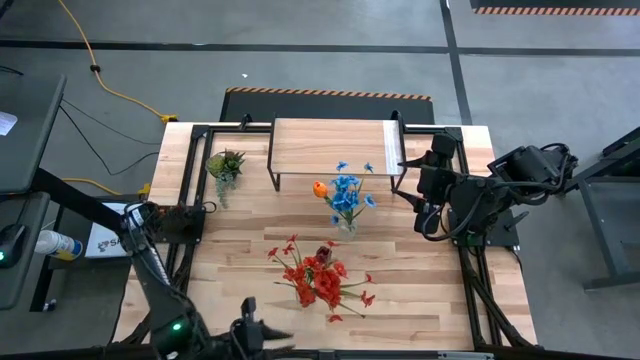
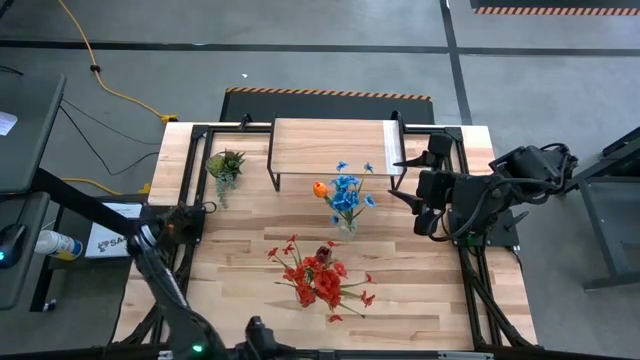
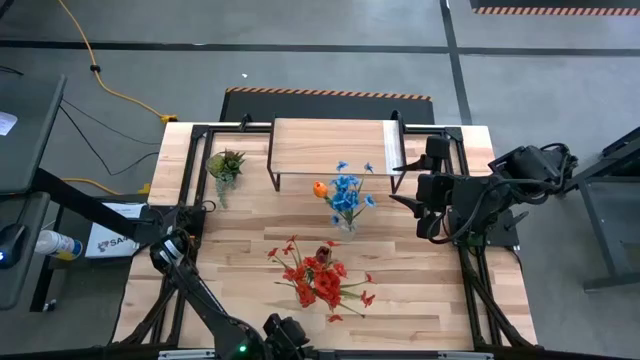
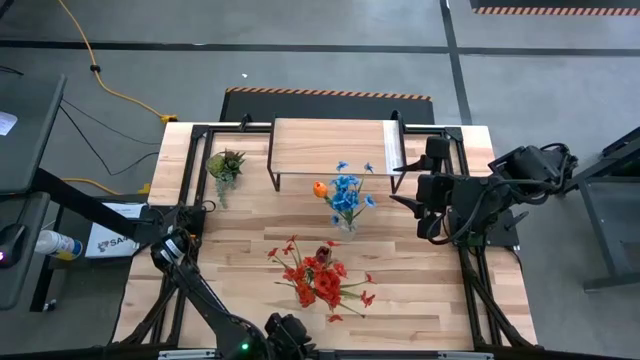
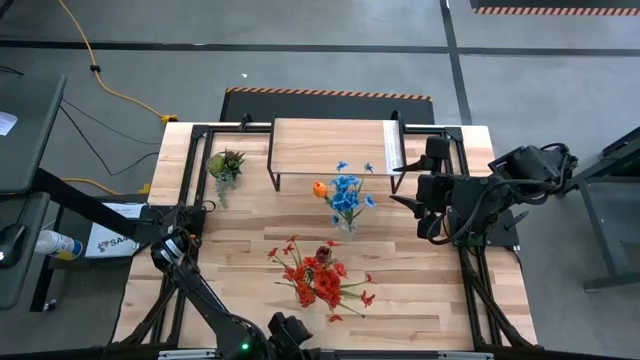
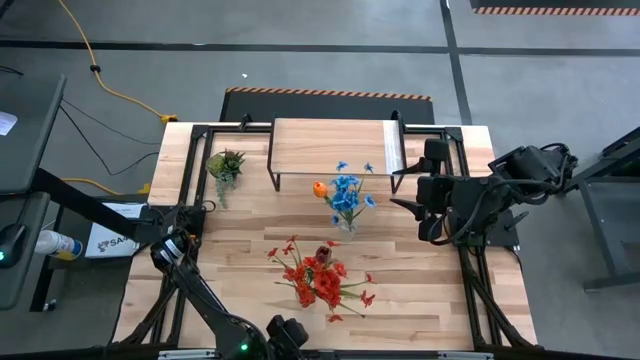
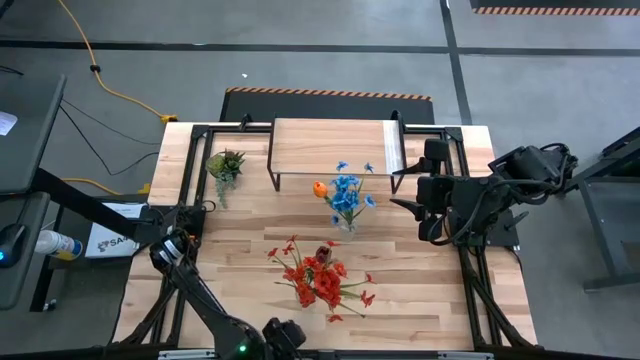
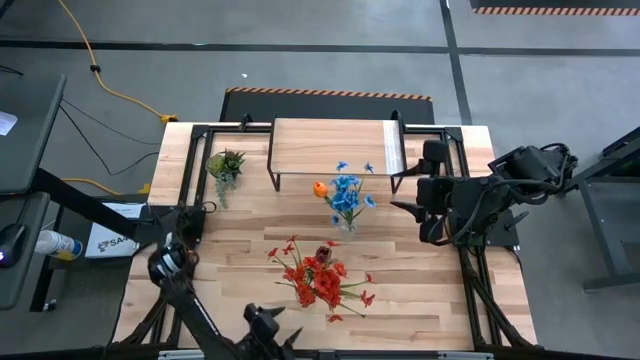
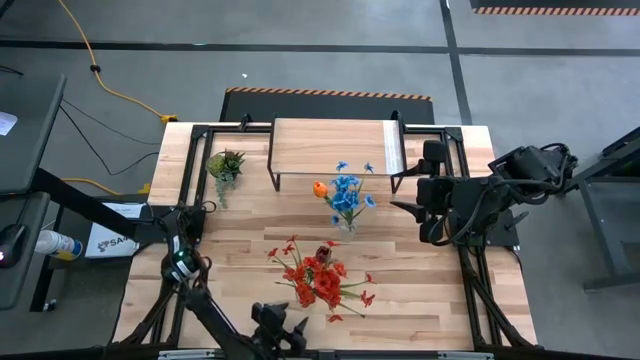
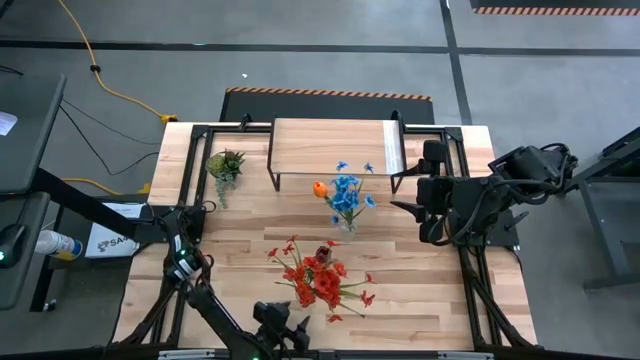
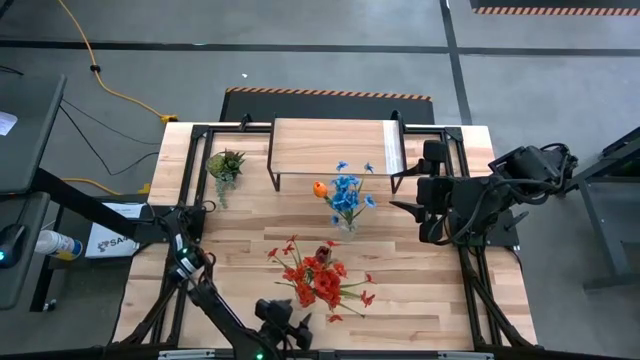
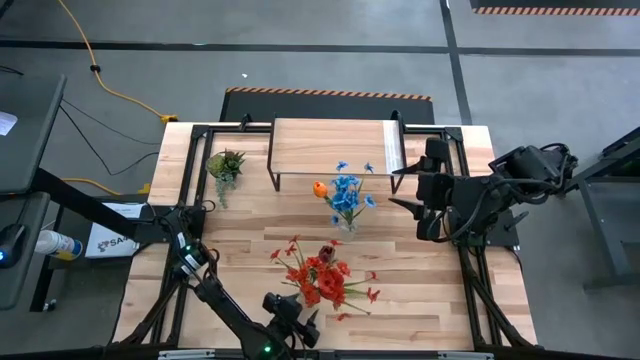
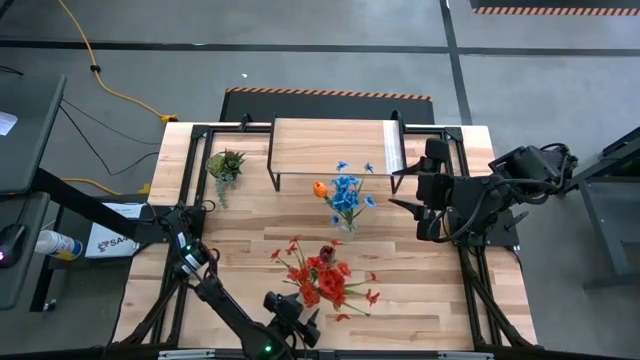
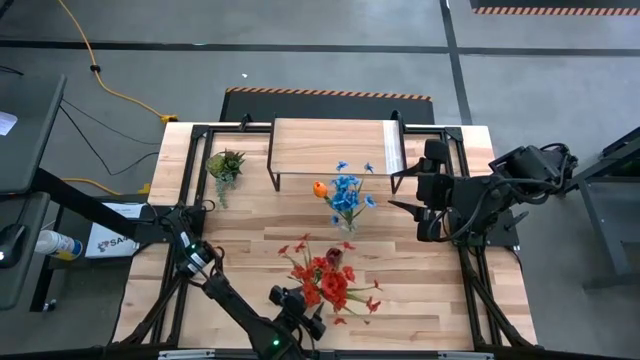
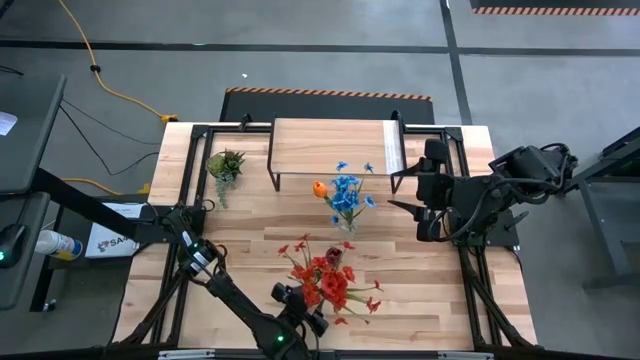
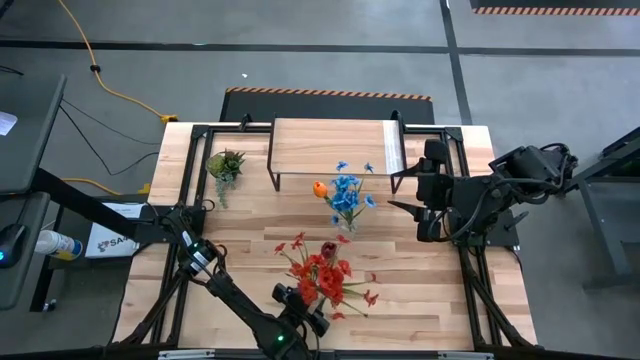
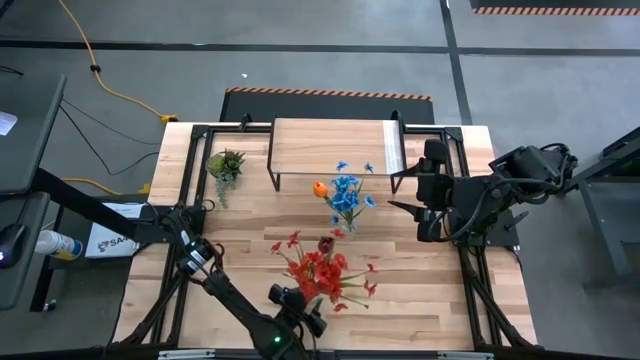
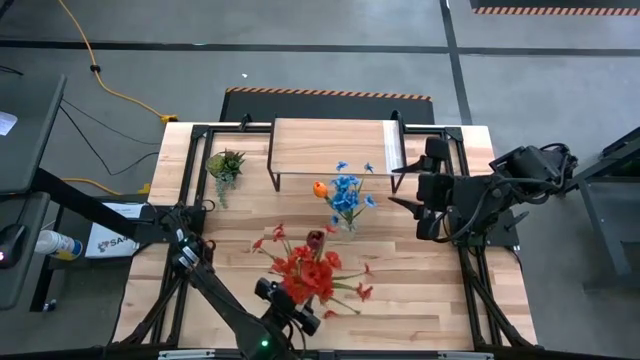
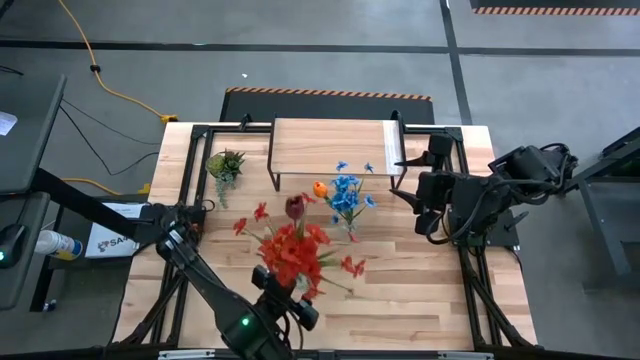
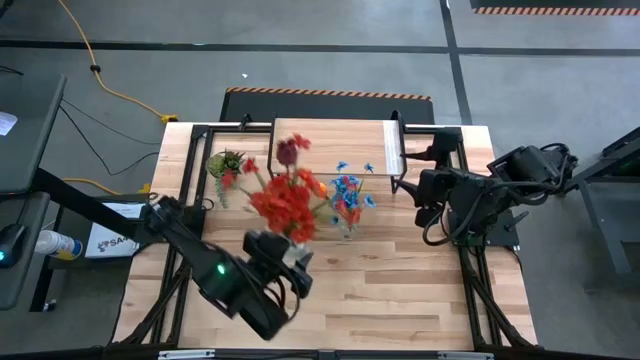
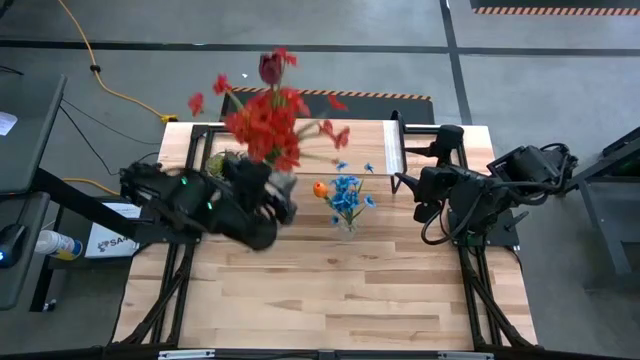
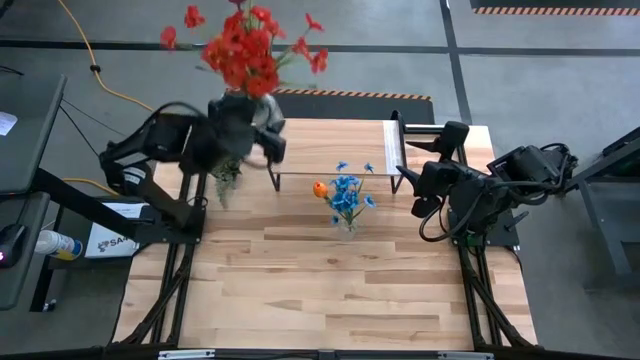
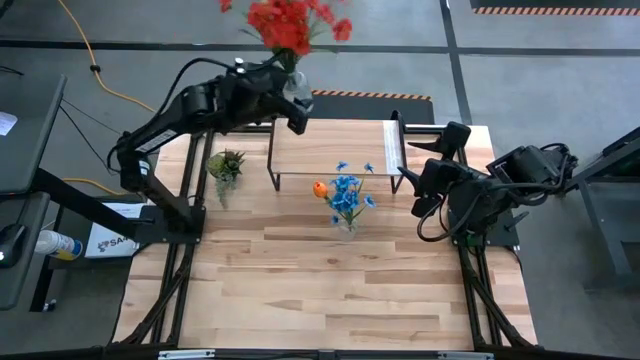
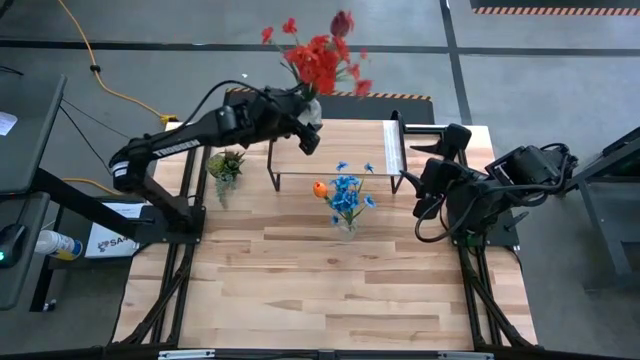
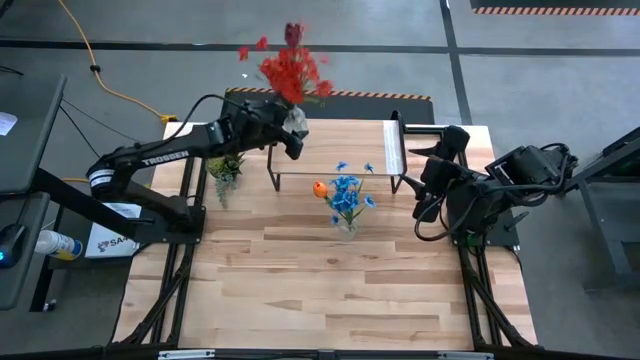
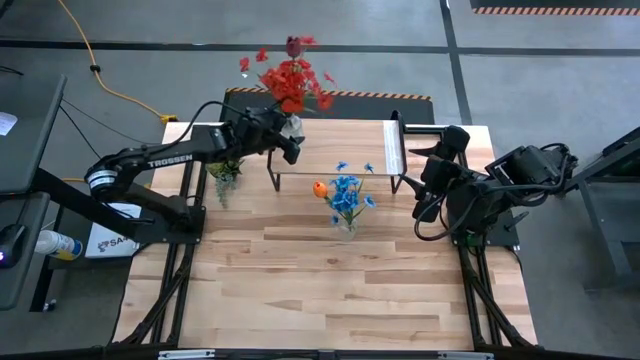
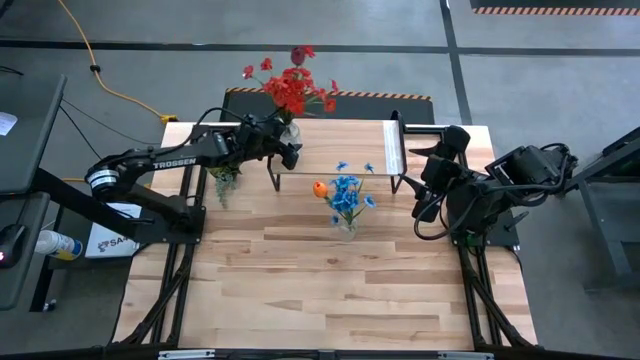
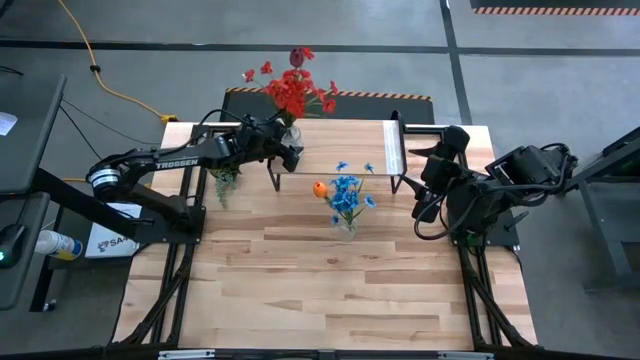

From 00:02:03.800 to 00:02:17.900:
Task: Pick and place flowers into a vace then onto a shelf
Put the bottom transparent vase on the shelf

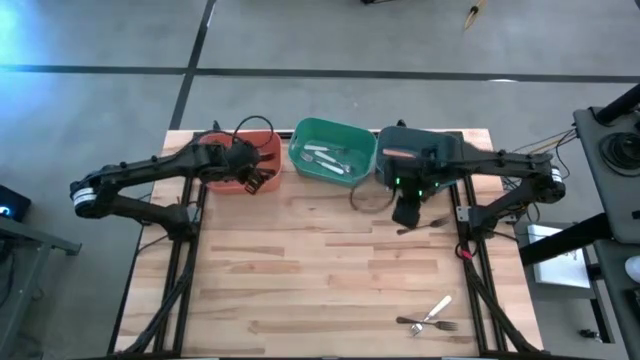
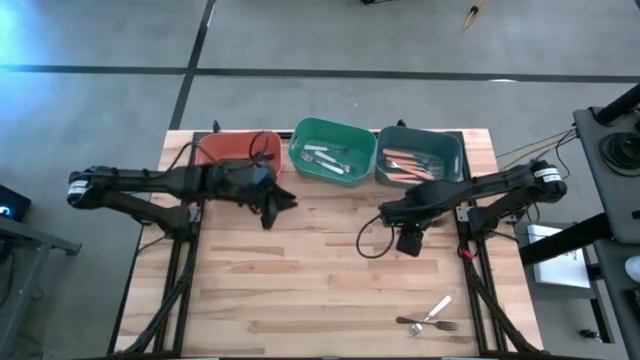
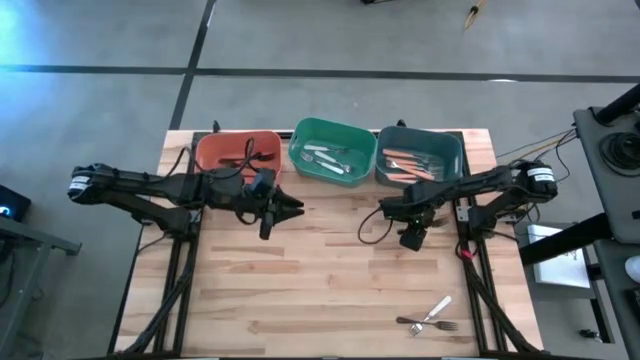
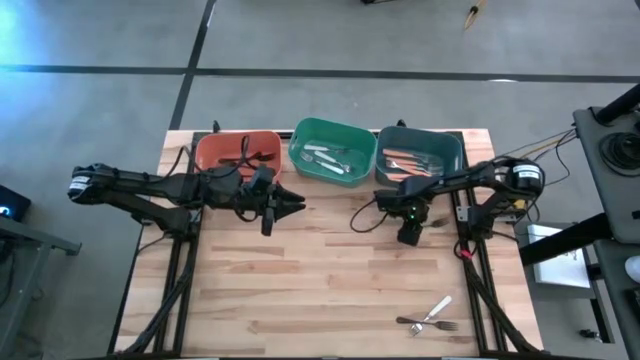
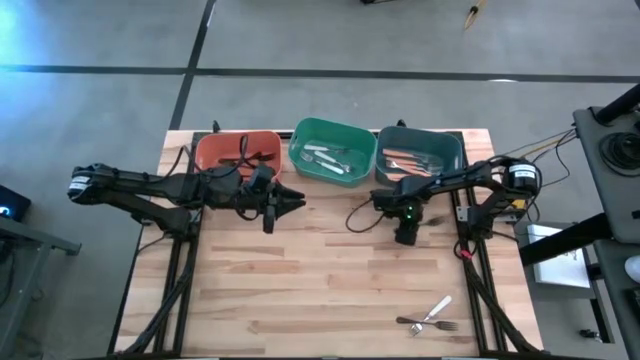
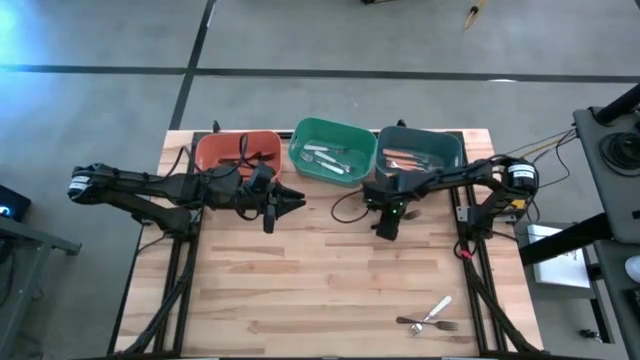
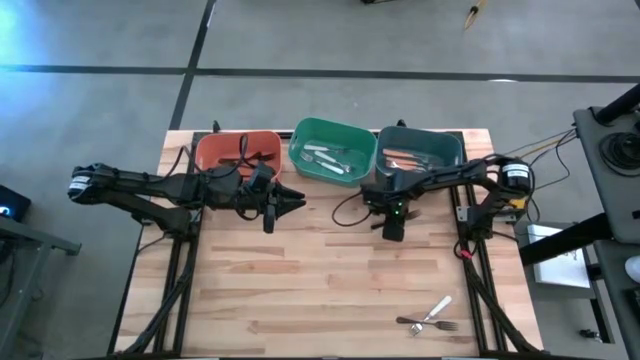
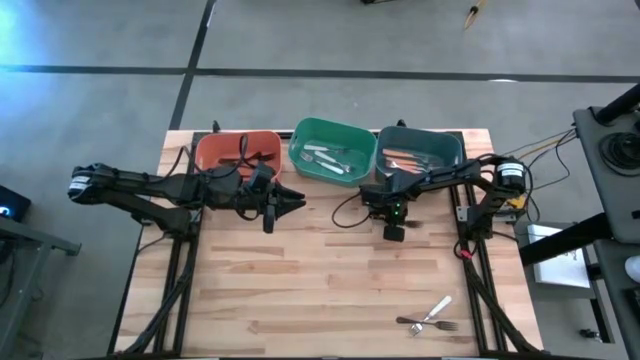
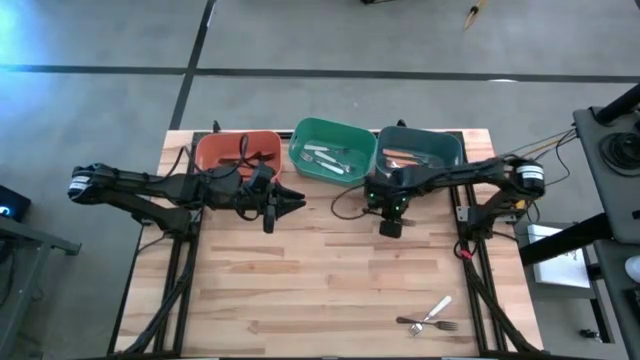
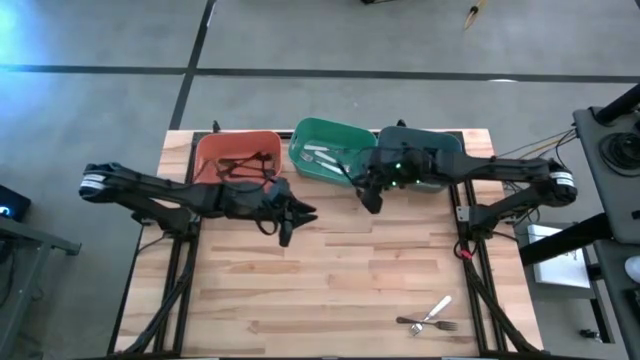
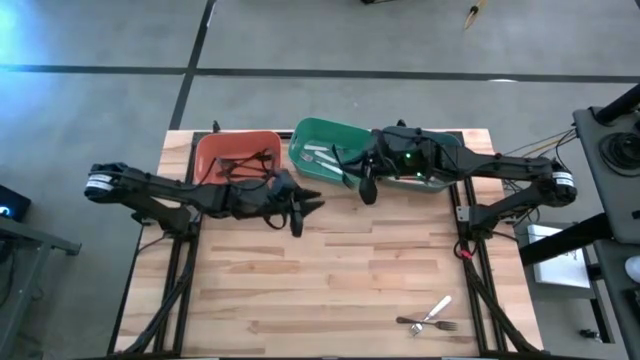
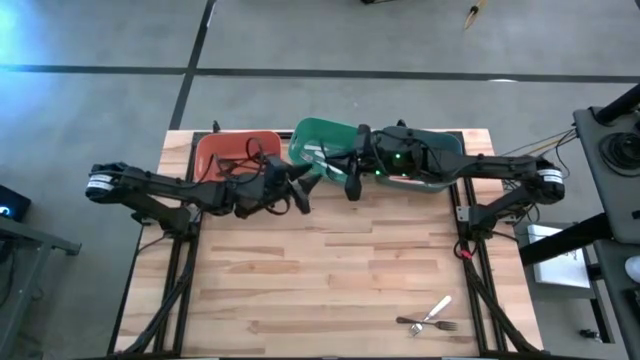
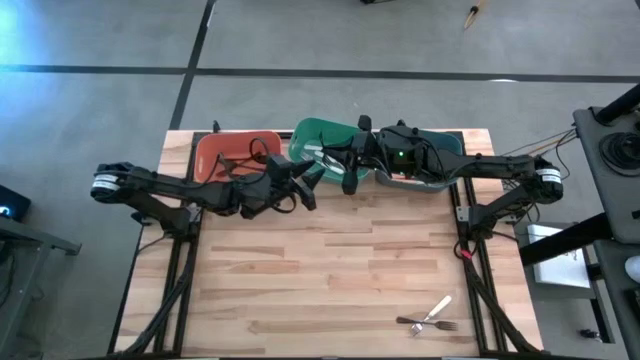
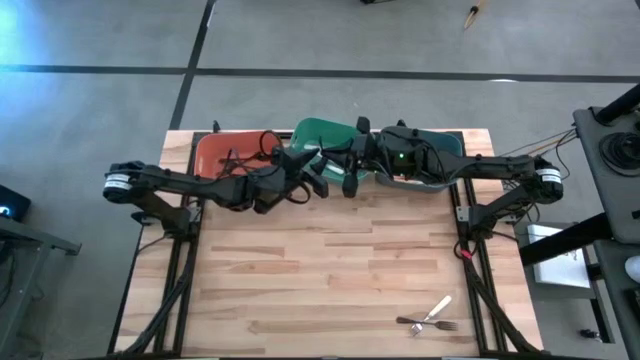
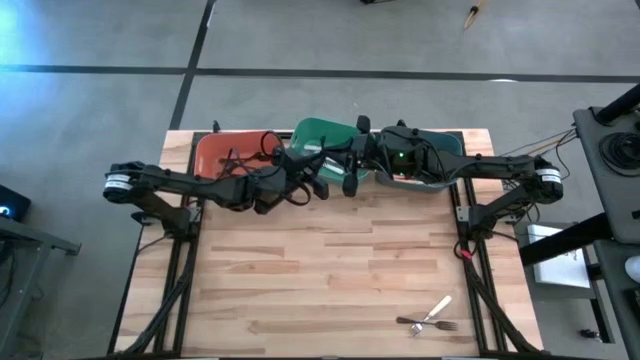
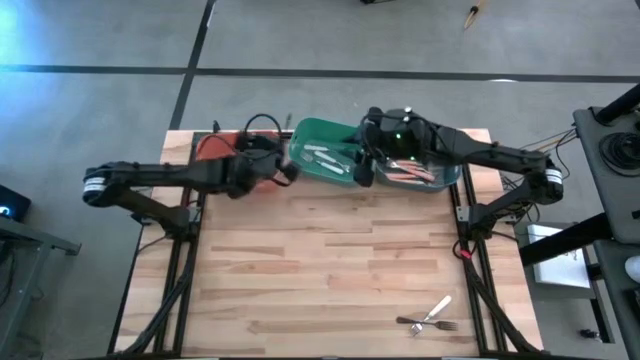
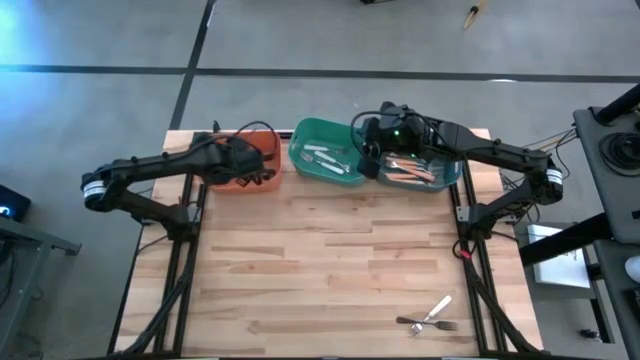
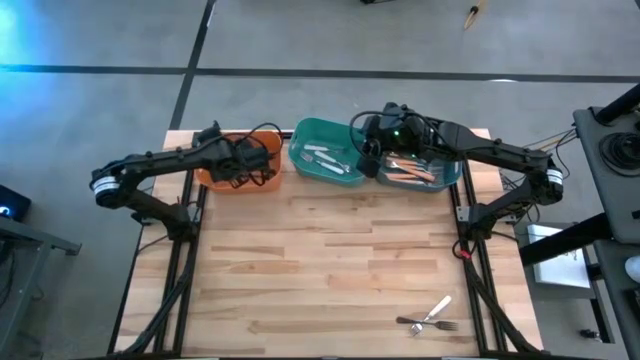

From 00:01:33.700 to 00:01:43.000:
Task: Sort silverware by color (type)
Put the black fork into the orange bin
